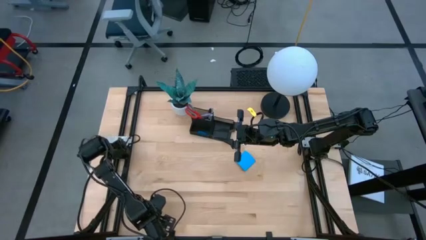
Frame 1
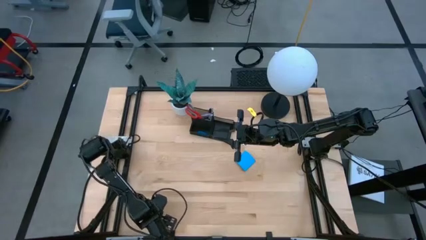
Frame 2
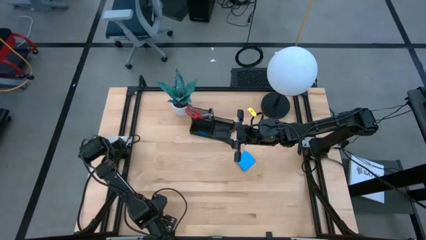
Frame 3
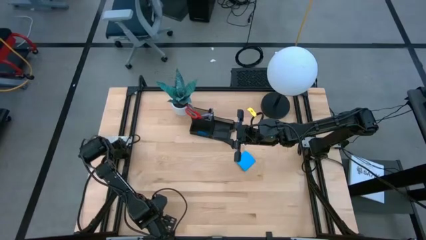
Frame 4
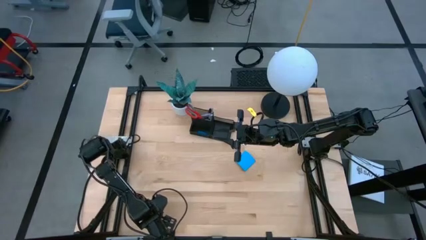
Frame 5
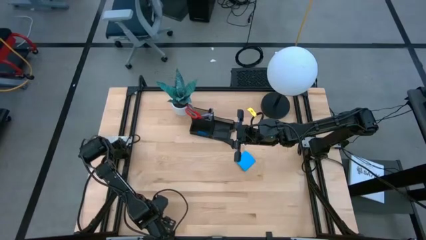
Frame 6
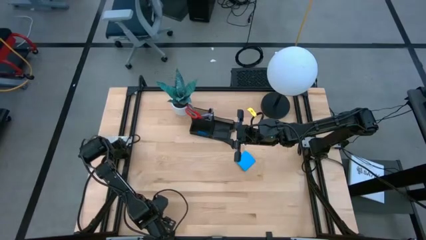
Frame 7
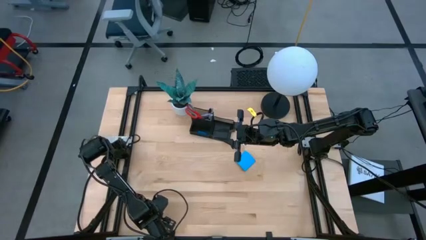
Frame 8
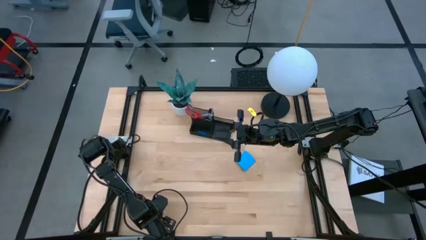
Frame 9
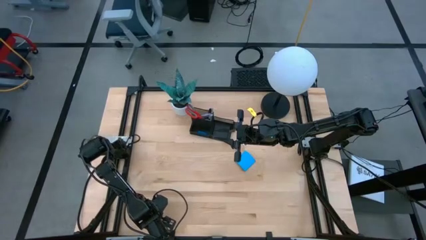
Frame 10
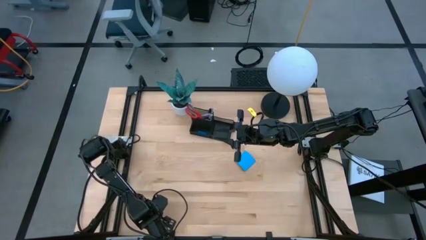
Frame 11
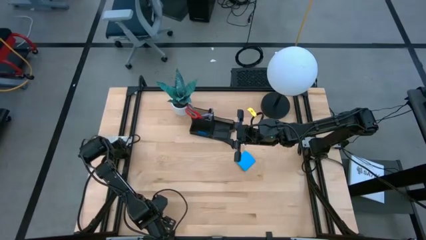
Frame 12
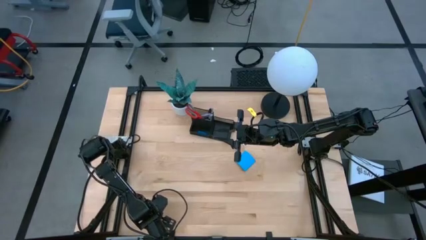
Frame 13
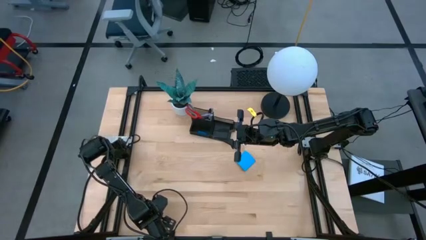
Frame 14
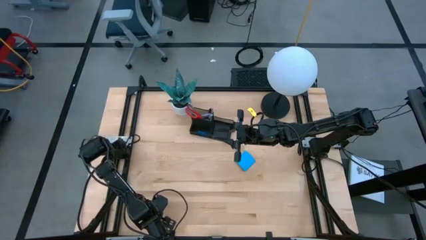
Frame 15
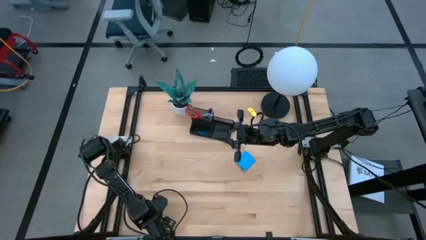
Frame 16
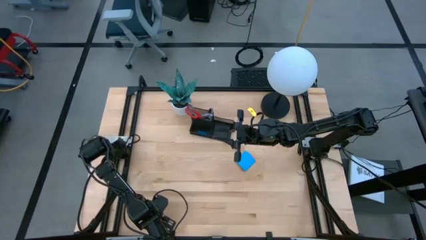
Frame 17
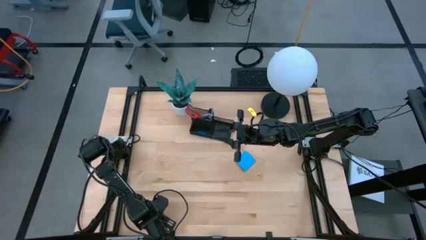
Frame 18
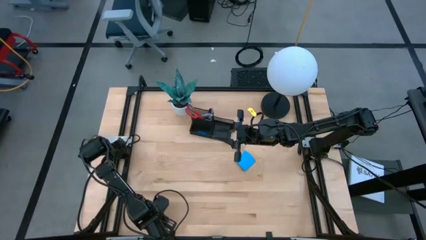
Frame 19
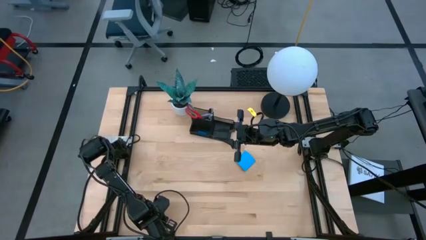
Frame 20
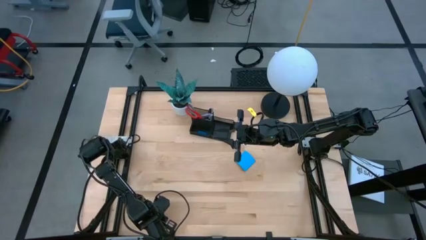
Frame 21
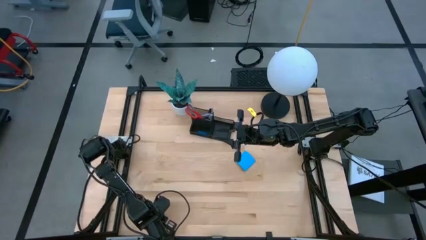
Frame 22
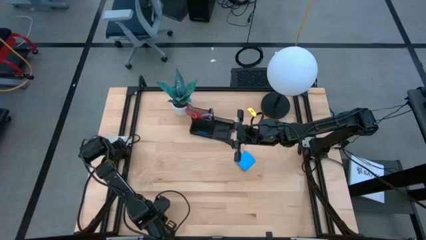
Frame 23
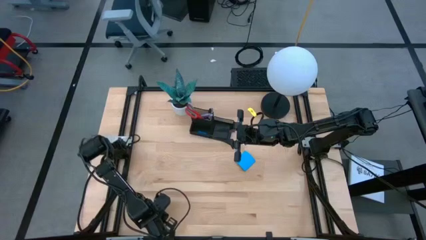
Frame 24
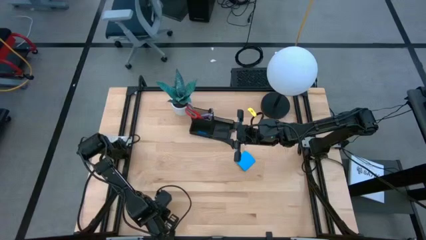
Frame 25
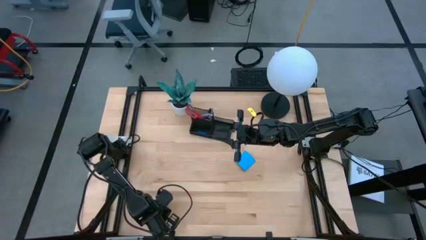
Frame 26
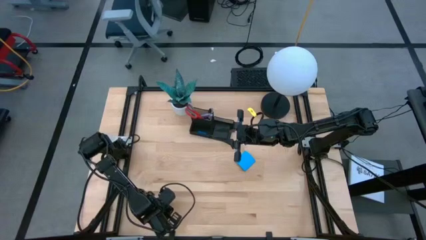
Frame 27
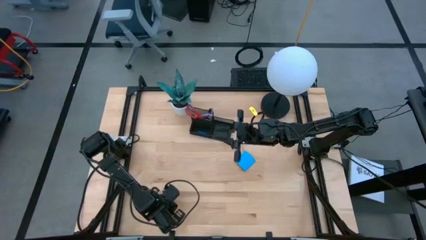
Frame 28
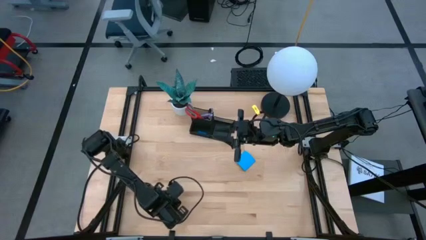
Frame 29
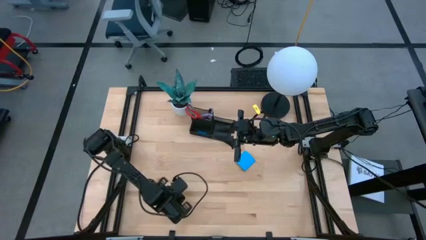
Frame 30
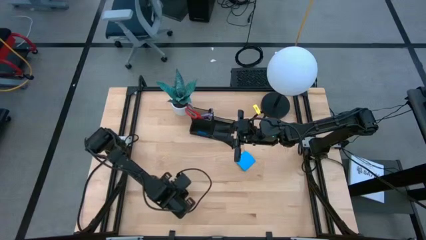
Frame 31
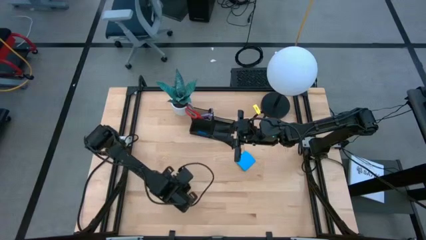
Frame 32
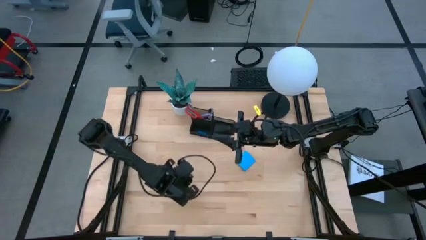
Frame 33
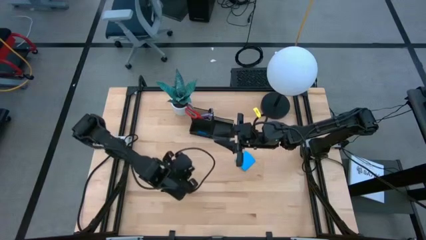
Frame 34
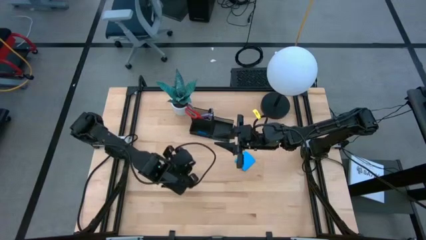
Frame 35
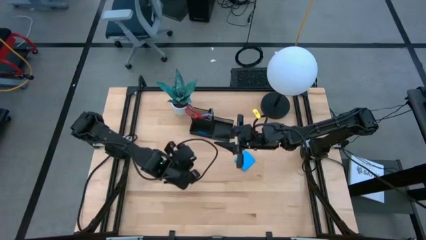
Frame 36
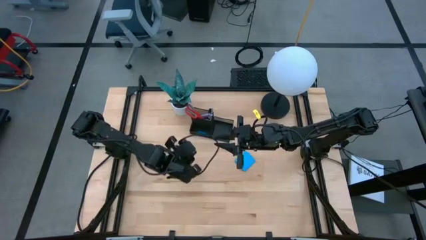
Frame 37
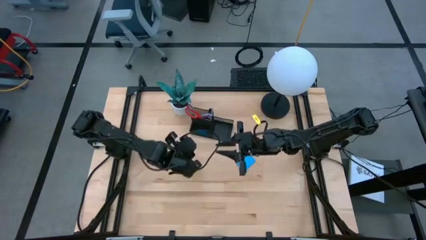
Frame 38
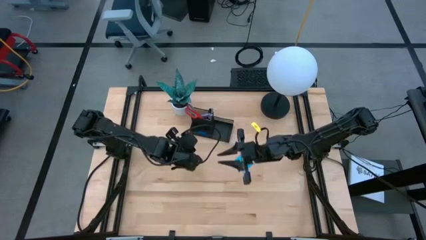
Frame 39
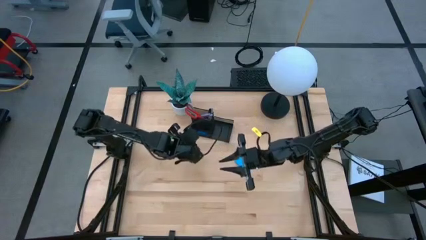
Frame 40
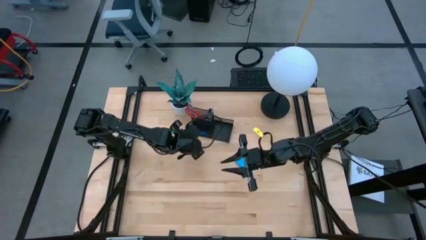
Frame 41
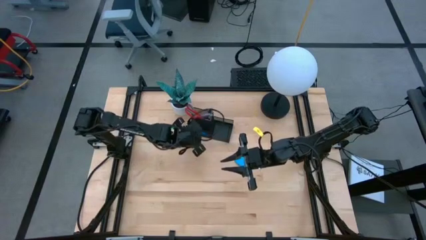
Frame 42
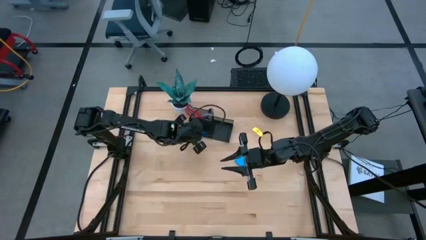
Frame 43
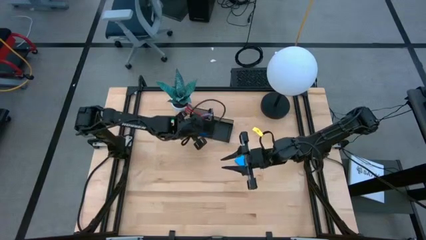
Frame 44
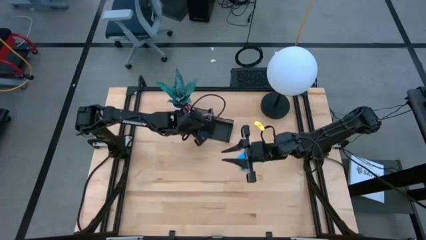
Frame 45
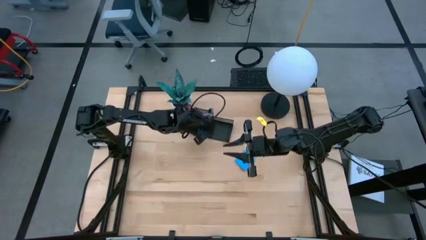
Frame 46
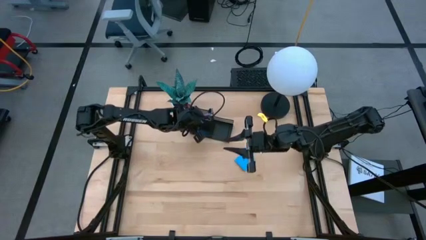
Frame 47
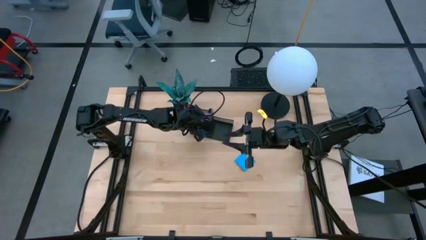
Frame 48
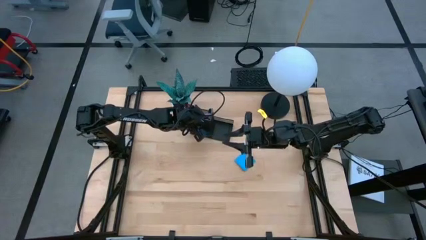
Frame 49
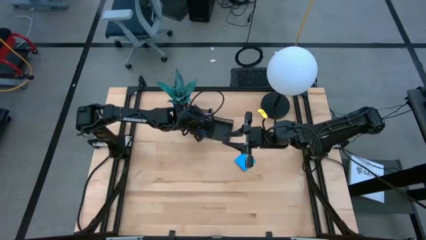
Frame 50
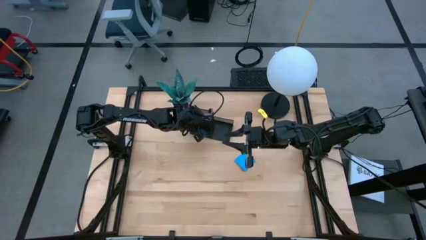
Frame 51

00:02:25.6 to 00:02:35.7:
Task: Pick and place office supplies into organizer
Put the blue paper clip into the black desk organizer

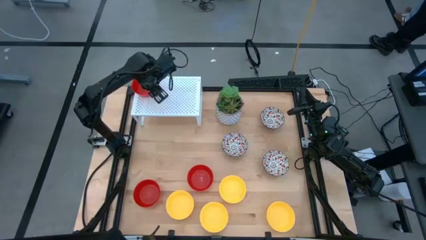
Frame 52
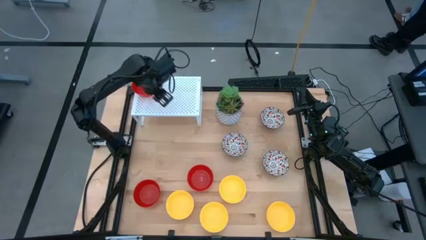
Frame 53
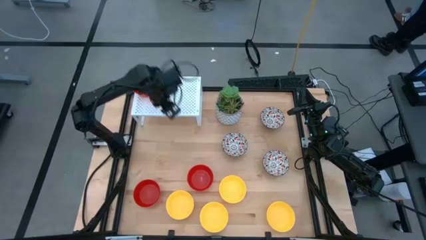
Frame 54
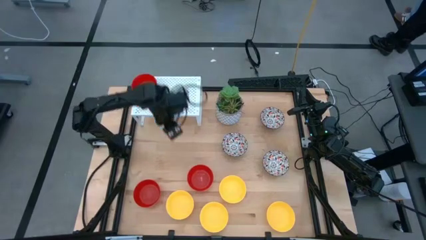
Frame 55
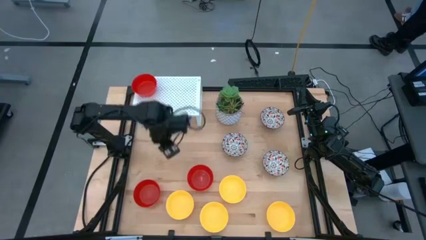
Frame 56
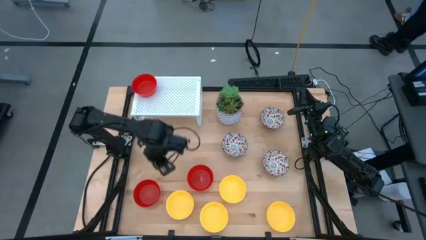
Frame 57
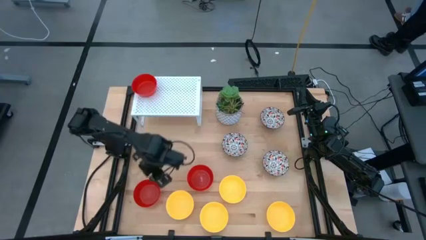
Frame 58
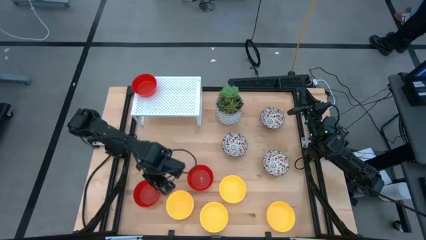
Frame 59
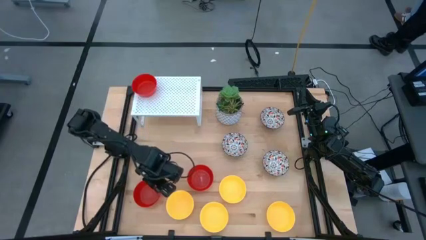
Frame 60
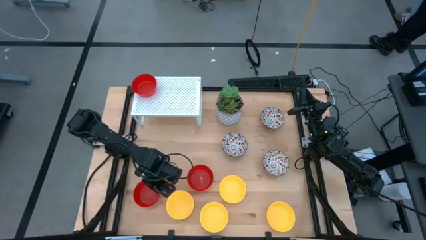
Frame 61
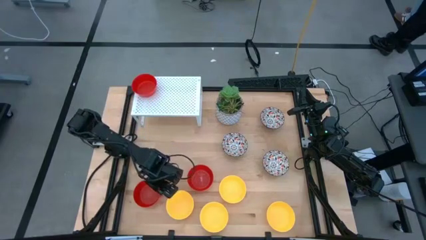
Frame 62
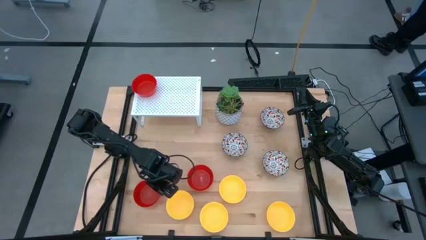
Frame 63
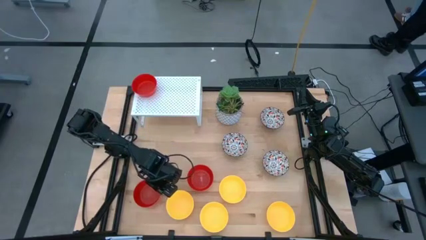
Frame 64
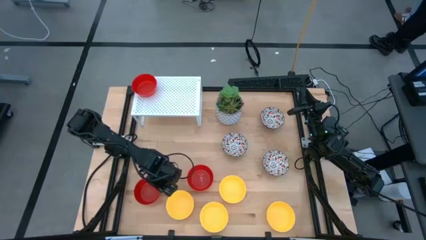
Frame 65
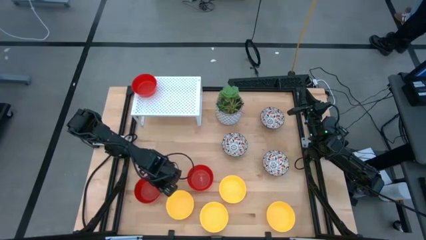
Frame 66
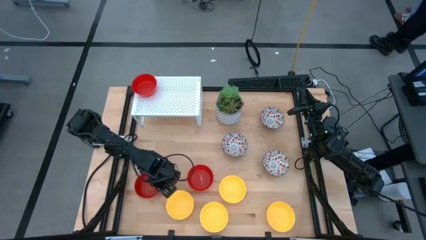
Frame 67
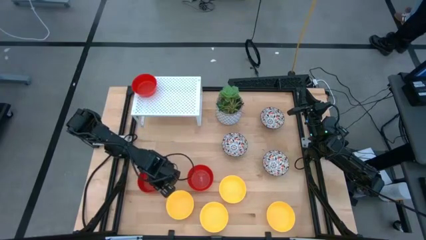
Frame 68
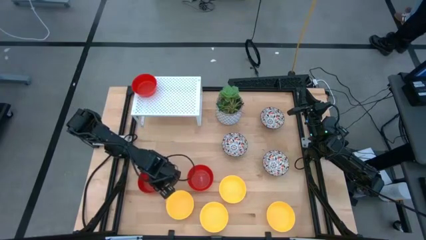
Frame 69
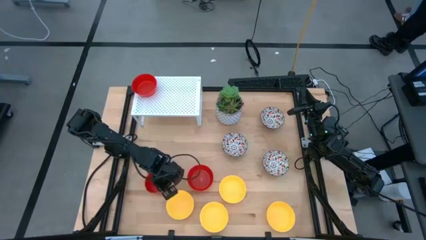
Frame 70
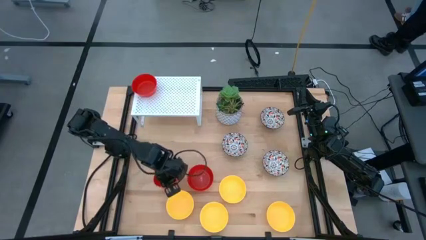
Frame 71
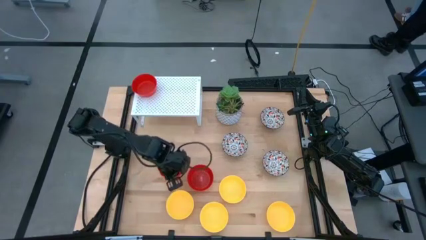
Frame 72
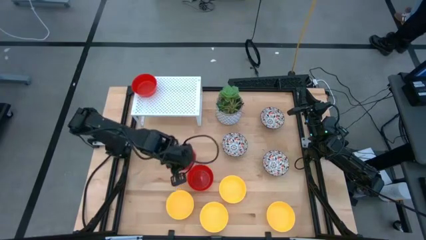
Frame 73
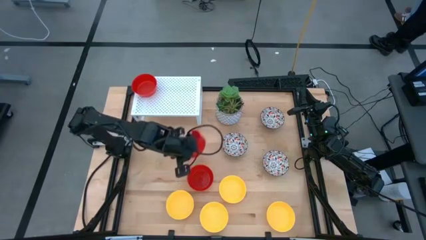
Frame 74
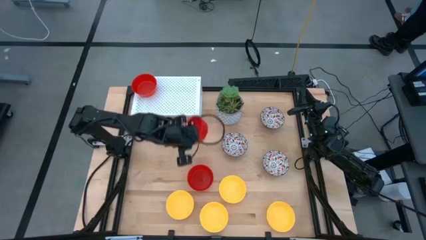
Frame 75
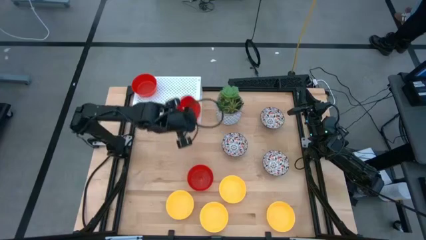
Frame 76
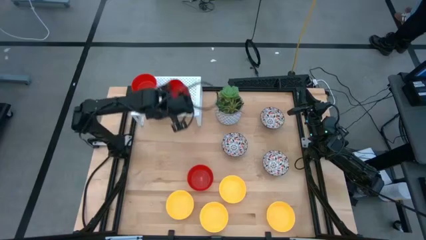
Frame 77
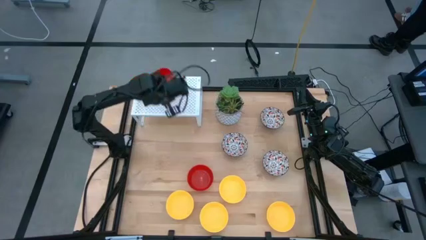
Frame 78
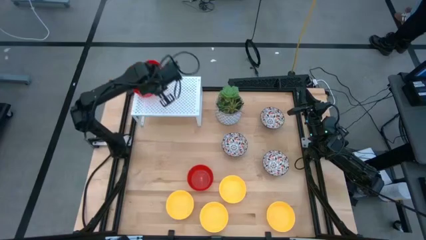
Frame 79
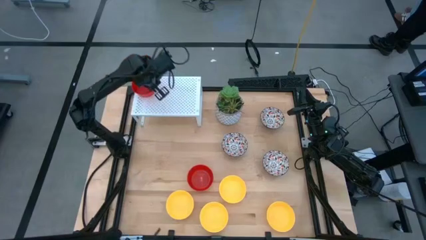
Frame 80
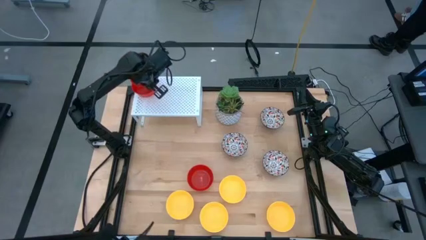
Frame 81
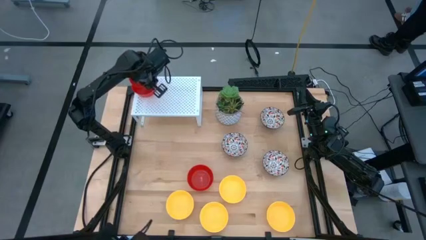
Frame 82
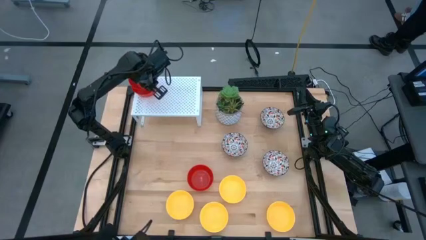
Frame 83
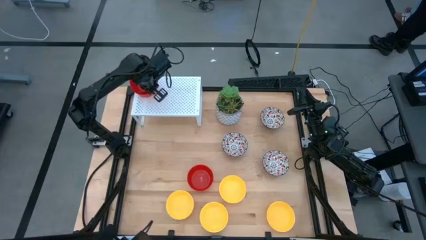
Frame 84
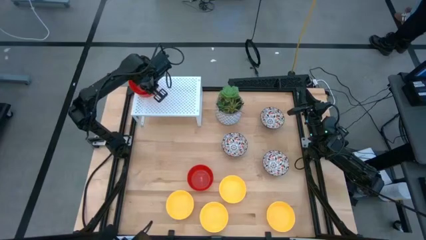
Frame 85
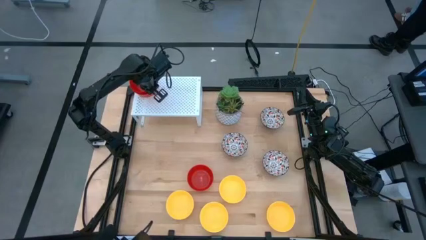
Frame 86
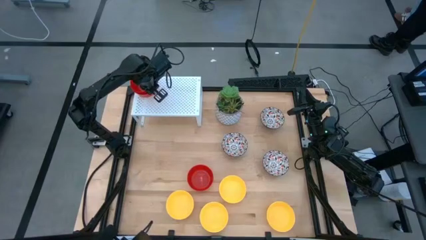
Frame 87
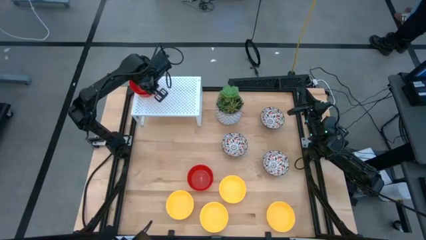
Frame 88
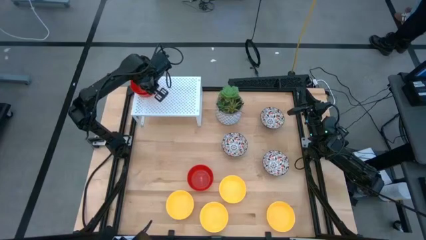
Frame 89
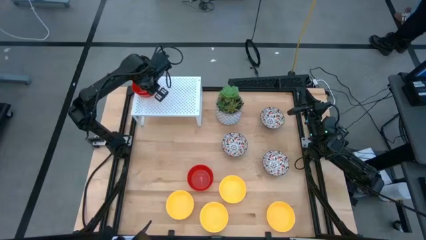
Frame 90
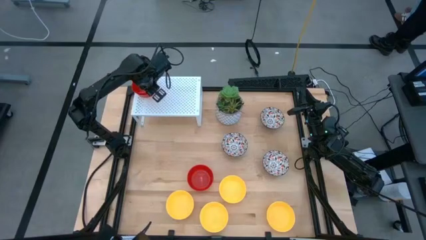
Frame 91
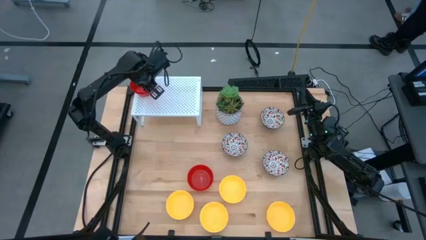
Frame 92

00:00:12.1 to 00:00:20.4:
Task: Pick & Place Mini bowls
Stack the red bowl on the red bowl on the shelf
